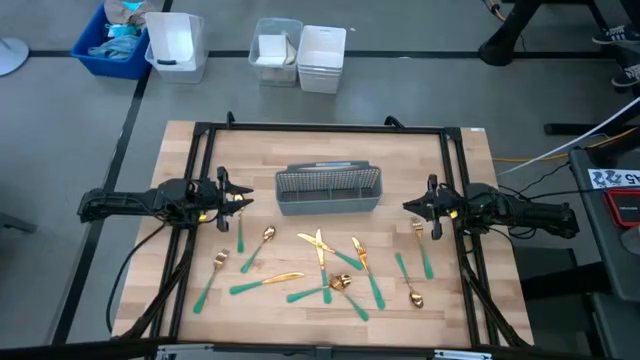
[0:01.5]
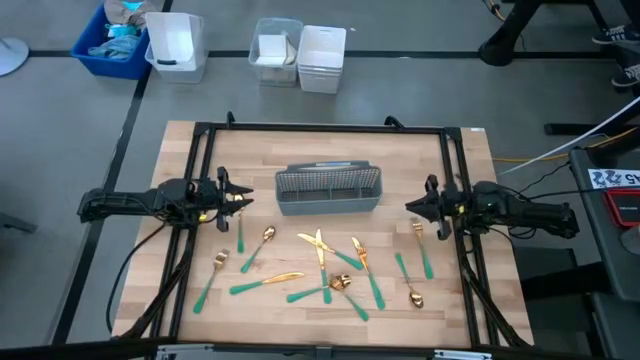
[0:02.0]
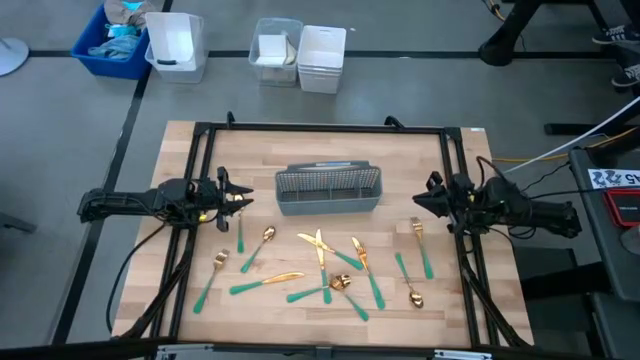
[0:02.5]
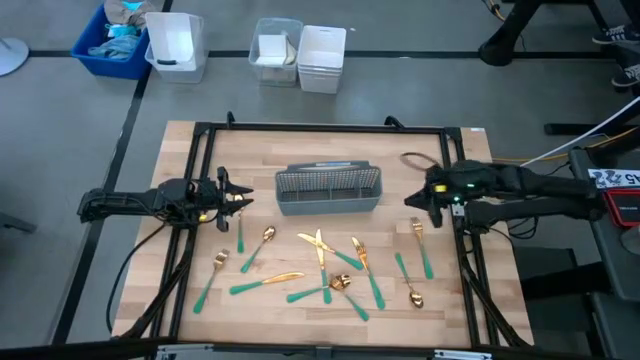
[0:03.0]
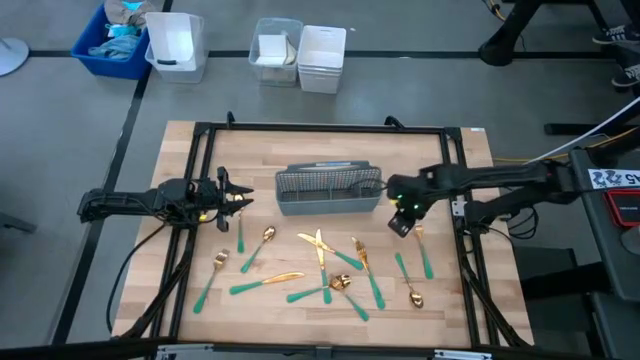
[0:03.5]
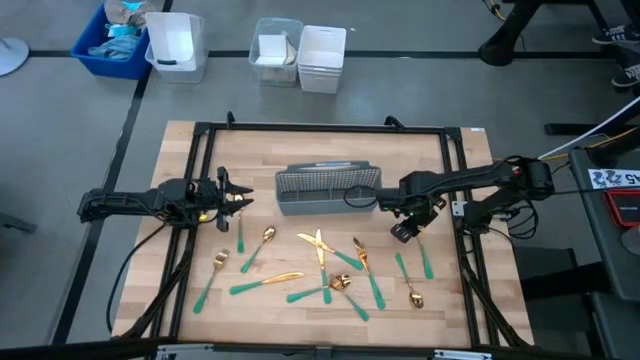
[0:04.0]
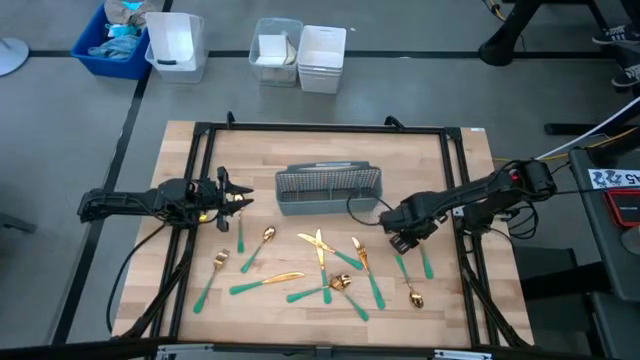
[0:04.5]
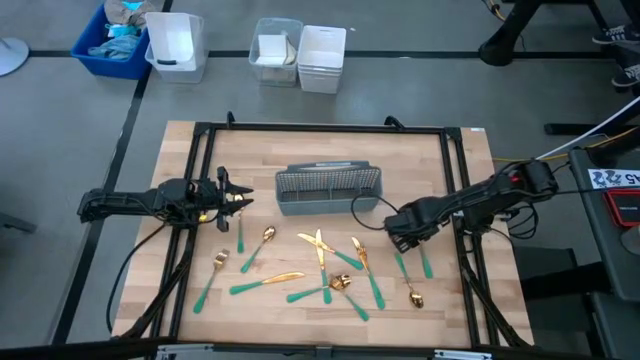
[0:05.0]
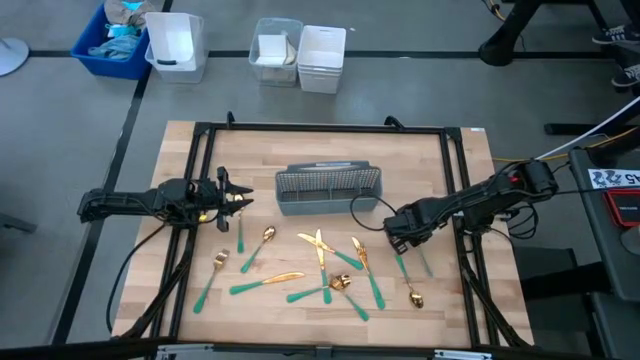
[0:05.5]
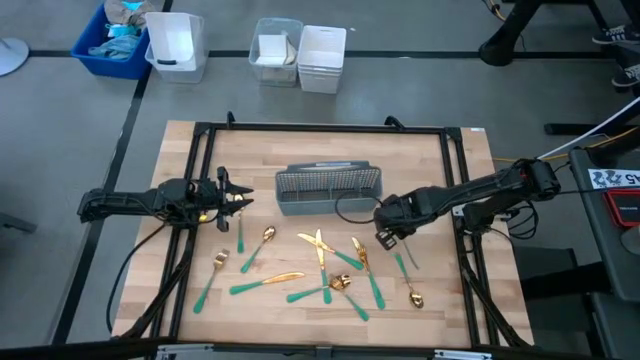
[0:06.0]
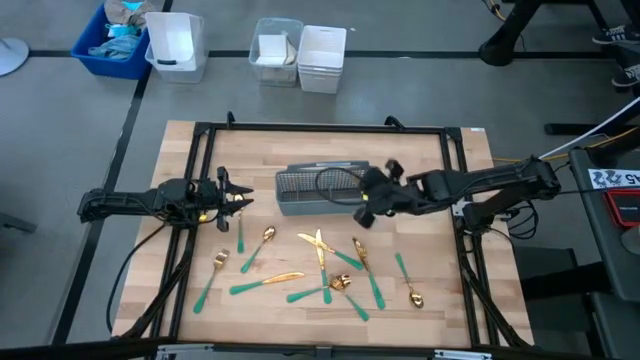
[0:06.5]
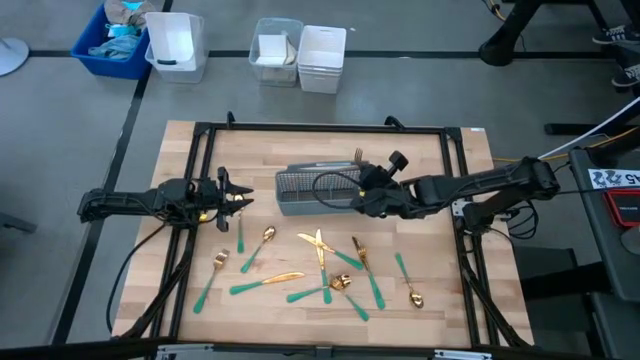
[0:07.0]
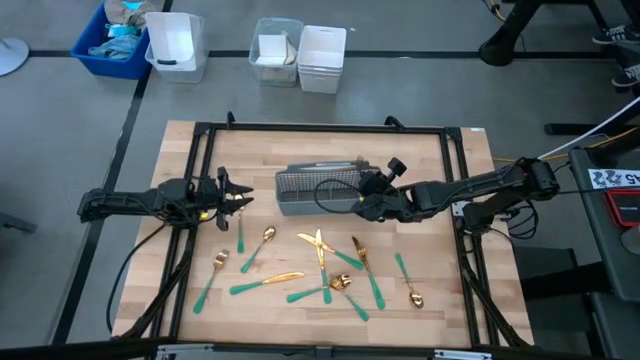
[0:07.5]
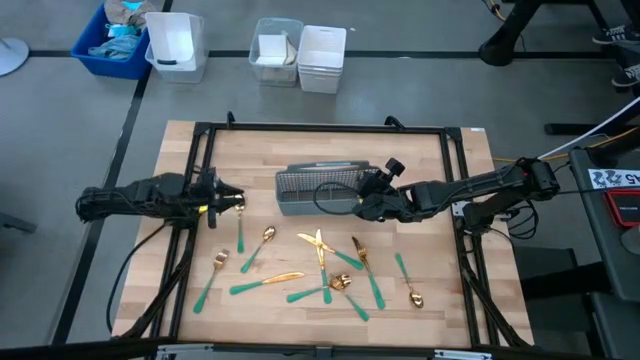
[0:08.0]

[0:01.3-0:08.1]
Task: Sort silverware
Put the green fork in the gray silverware basket

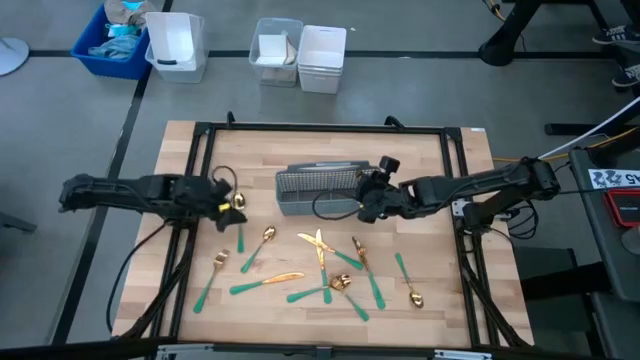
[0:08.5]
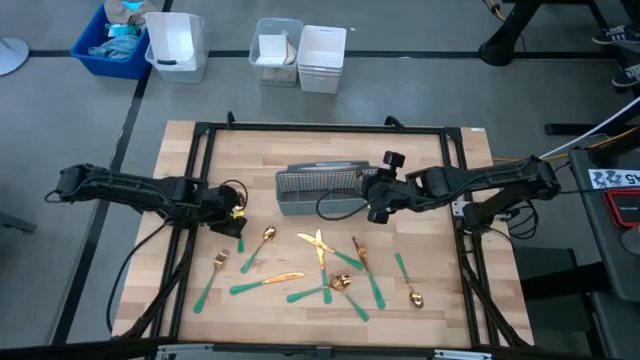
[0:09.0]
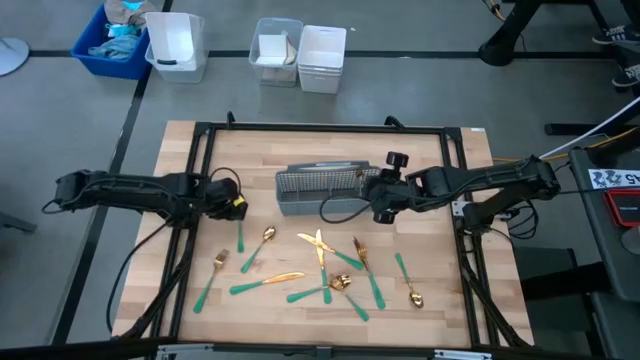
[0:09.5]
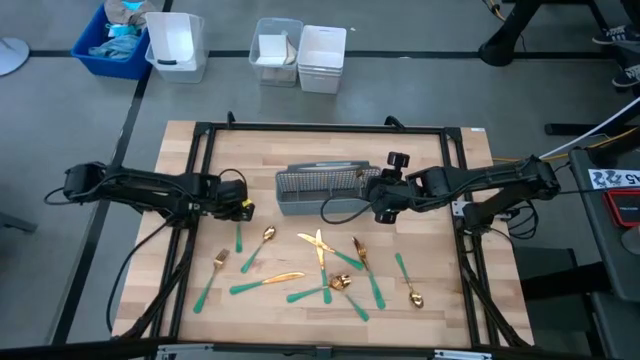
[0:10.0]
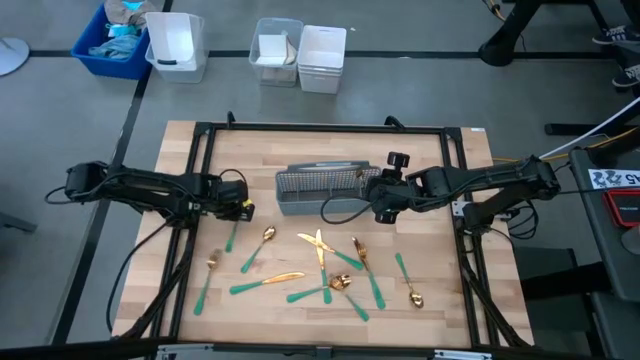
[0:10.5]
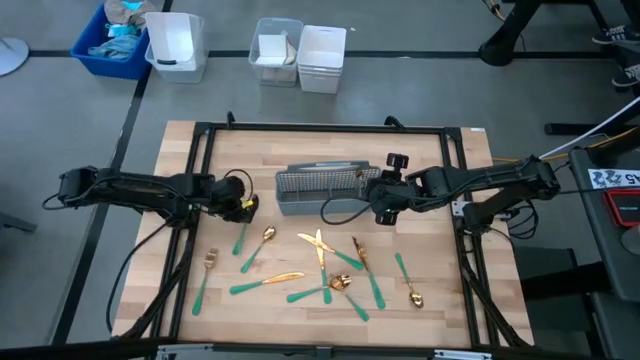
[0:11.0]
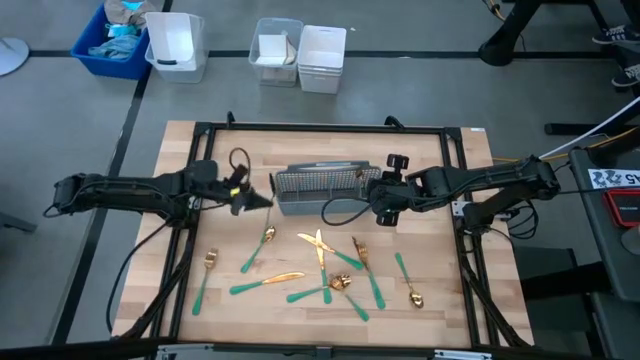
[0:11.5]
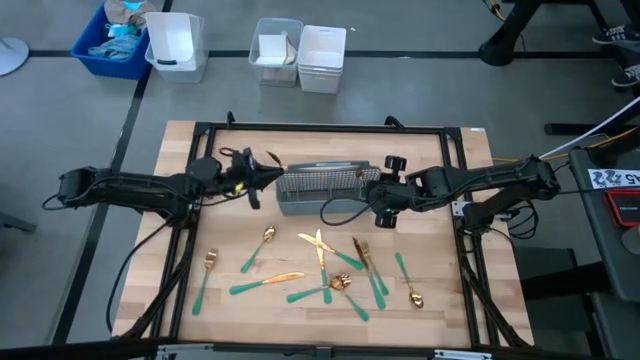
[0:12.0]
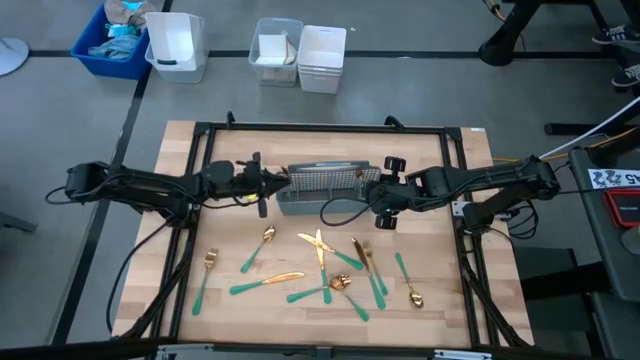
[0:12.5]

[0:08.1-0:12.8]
Put the green spoon in the gray silverware basket

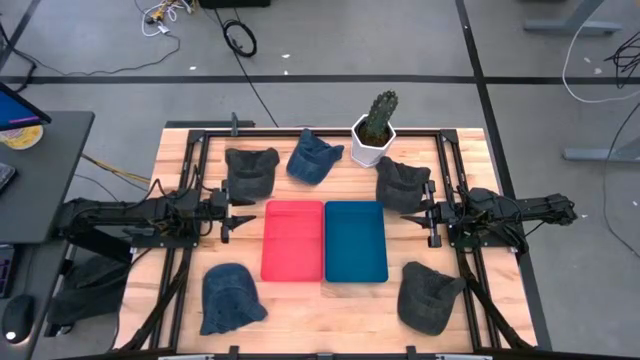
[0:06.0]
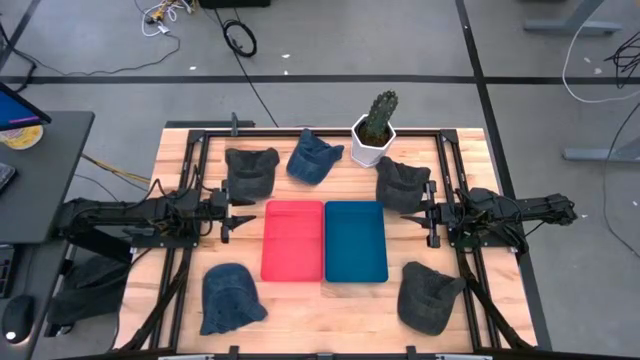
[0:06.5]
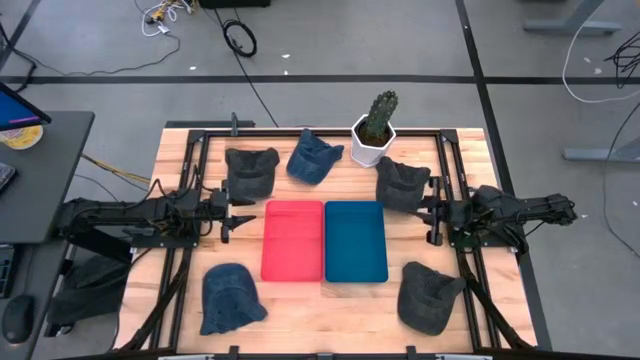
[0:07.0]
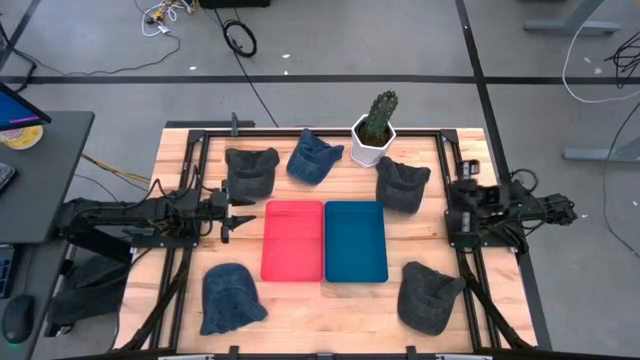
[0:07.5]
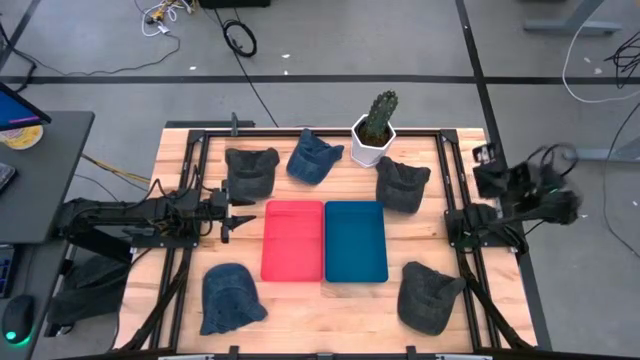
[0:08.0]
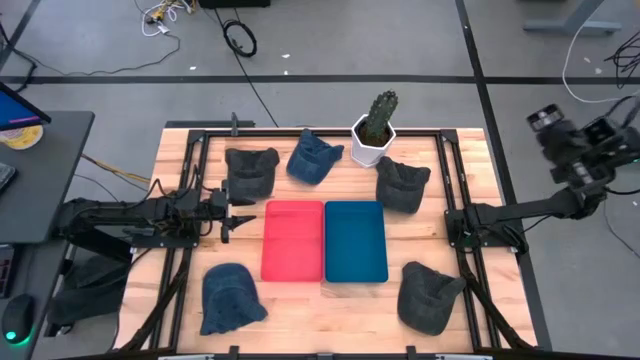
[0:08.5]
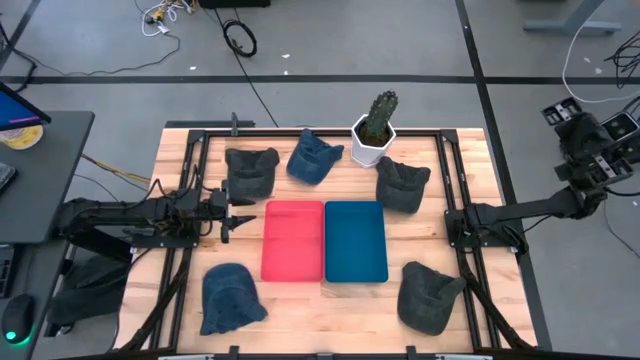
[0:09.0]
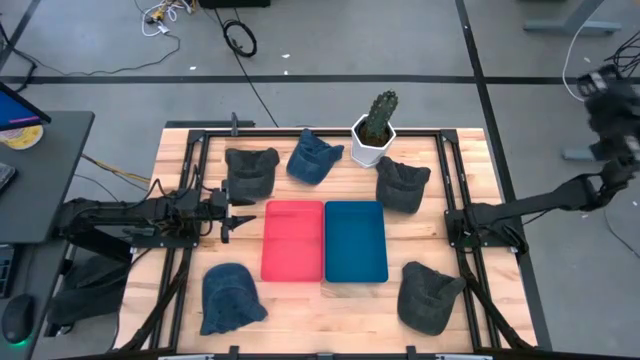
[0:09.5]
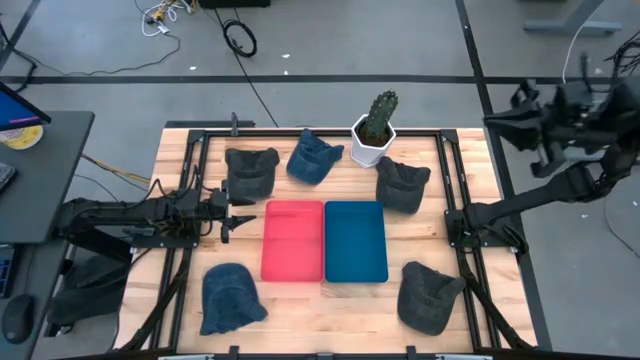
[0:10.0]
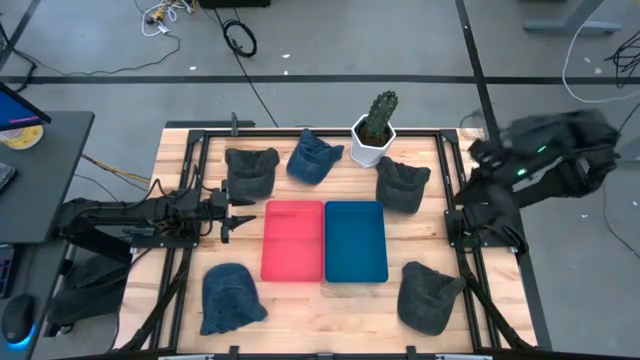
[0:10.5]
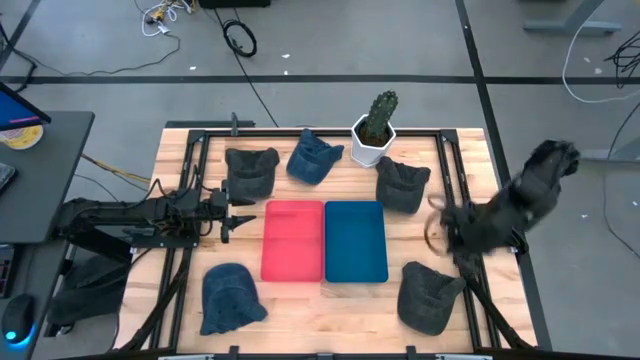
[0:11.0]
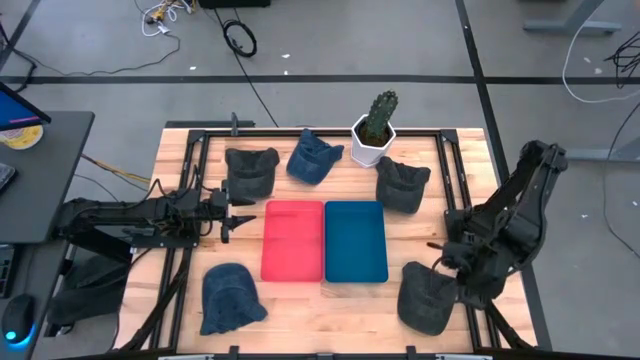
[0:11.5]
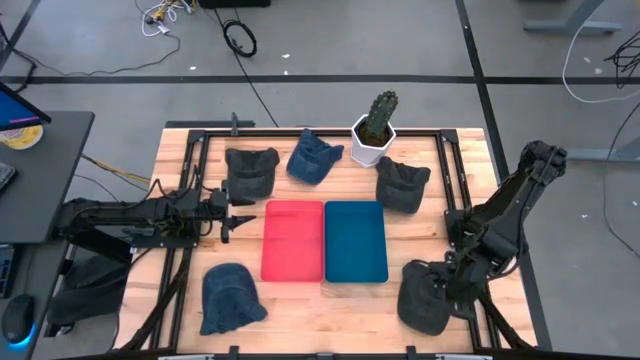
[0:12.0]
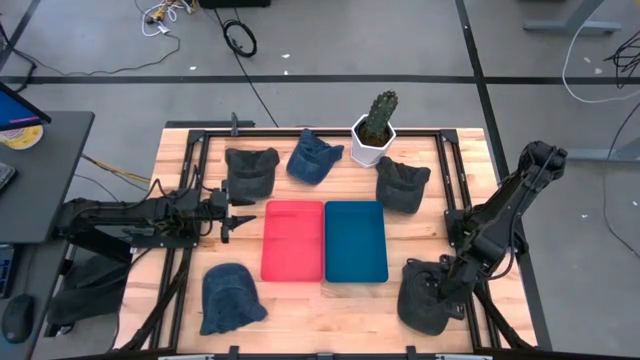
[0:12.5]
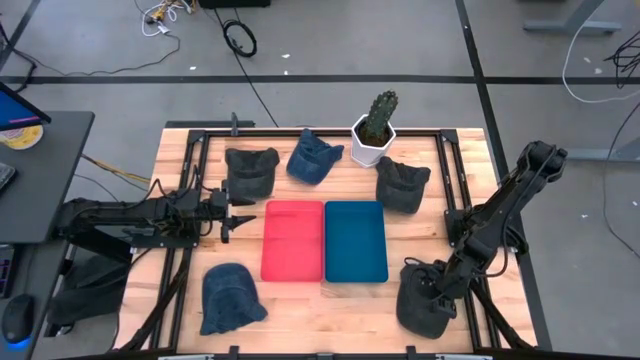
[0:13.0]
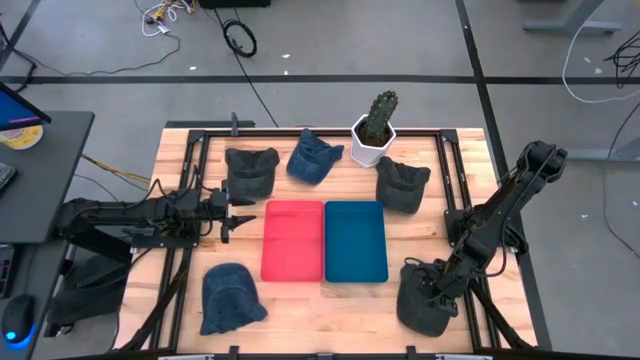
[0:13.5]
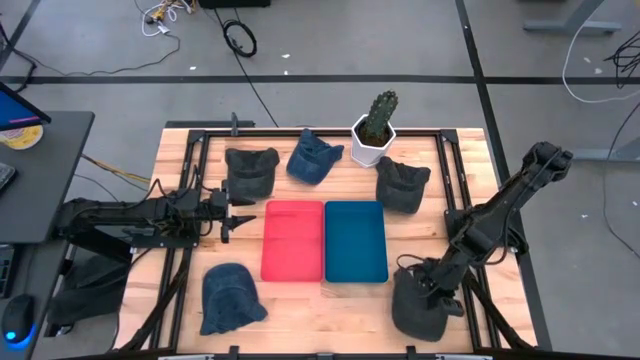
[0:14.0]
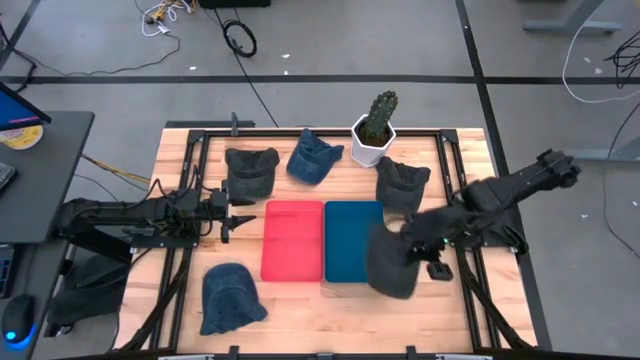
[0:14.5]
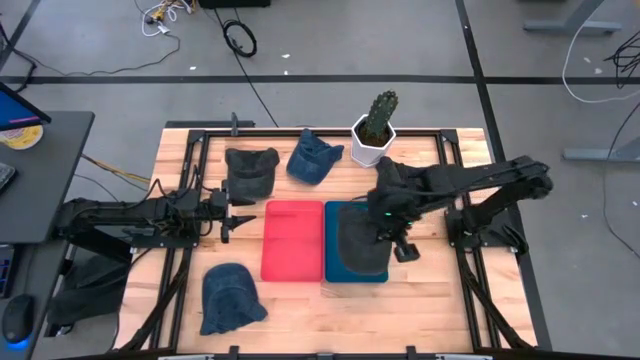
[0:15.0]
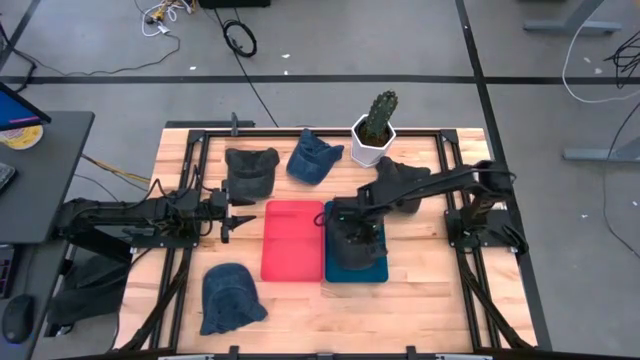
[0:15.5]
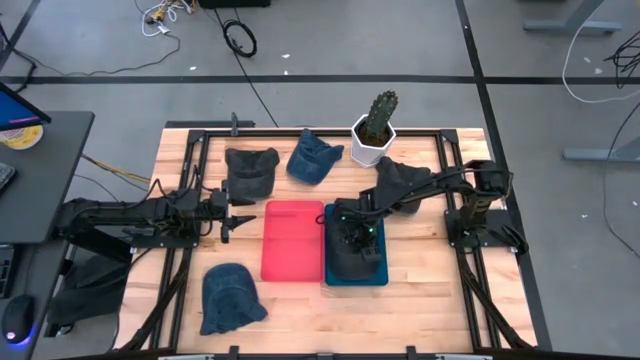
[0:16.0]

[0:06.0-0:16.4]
Task: Pick & Place hat
Put the bottom black cap into the blue bin

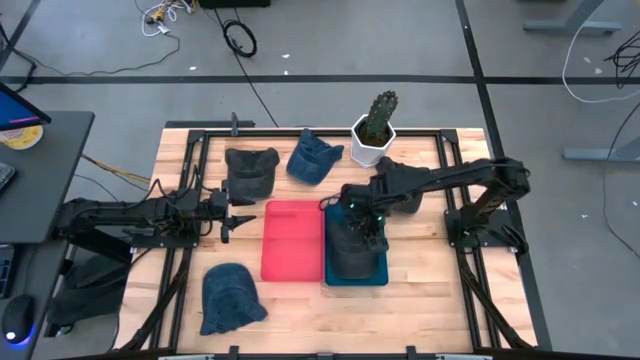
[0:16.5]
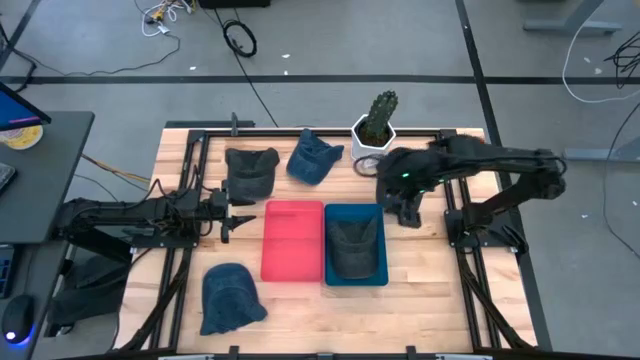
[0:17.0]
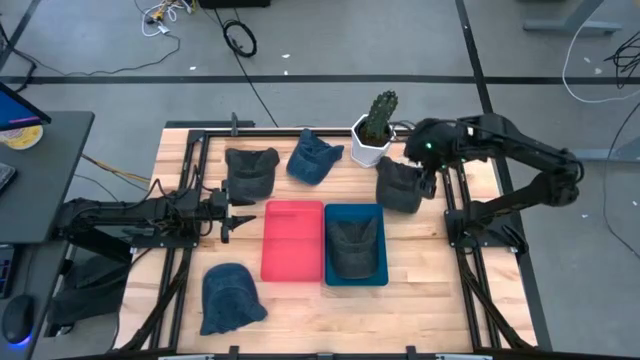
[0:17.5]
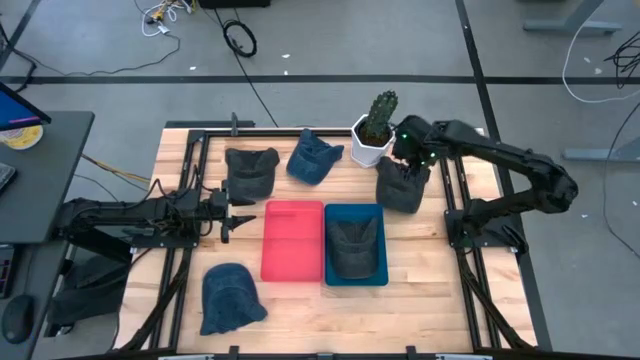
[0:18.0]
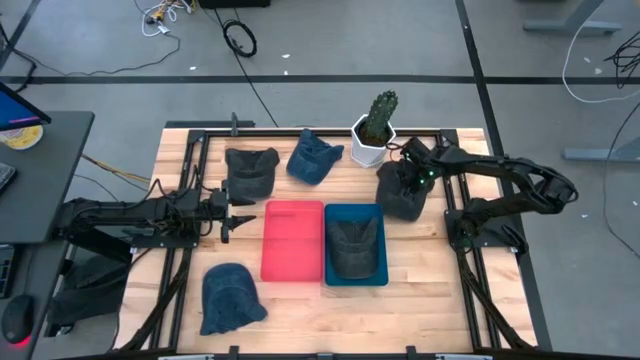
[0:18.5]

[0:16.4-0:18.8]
Put the right black cap into the blue bin
